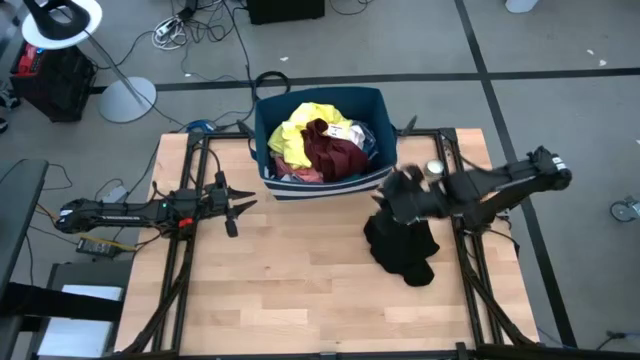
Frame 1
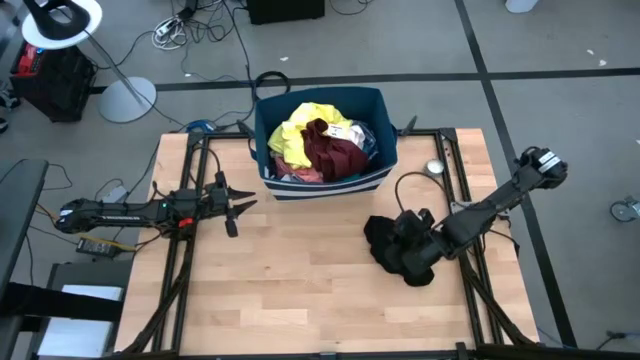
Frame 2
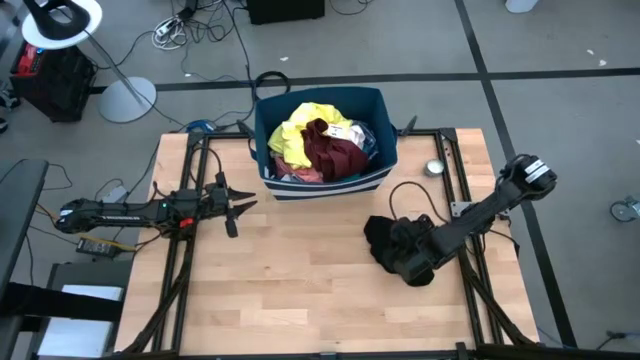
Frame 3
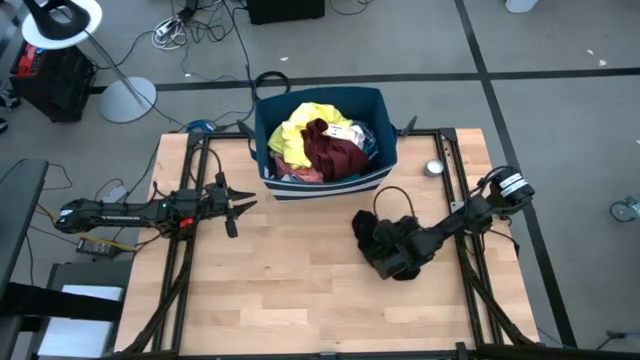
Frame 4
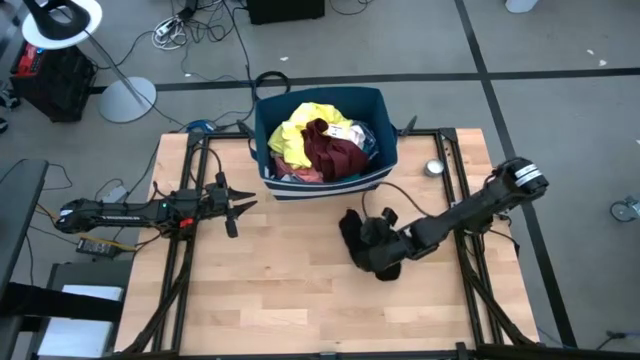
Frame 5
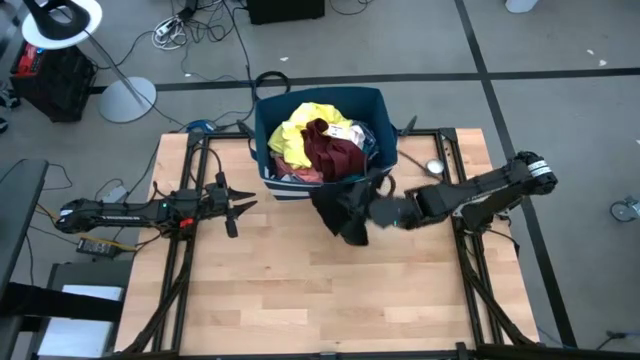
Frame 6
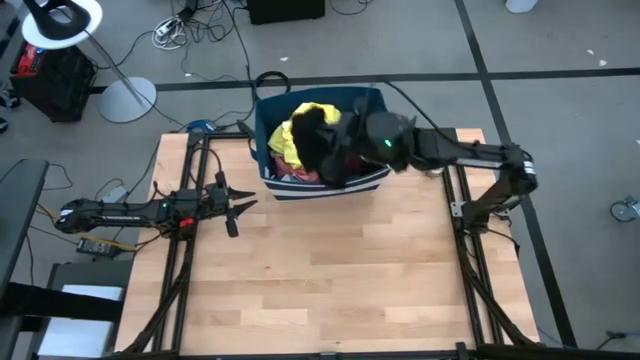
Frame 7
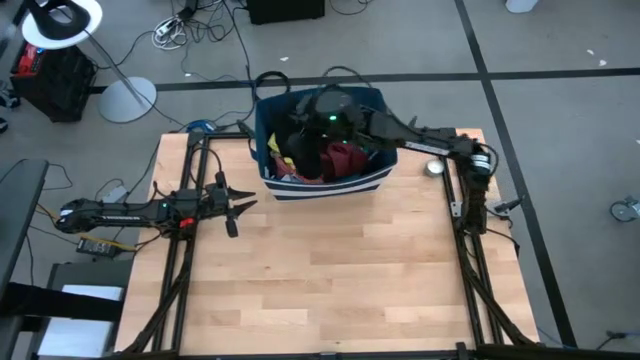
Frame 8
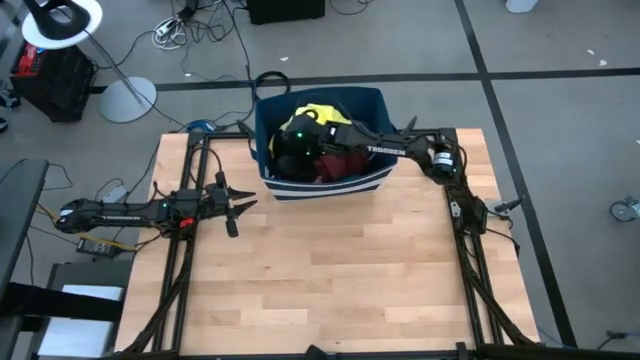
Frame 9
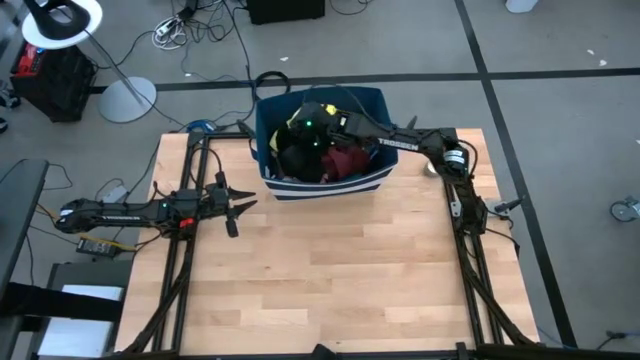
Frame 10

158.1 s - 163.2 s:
Task: Sort clothes
Put the black underwear into the blue bin

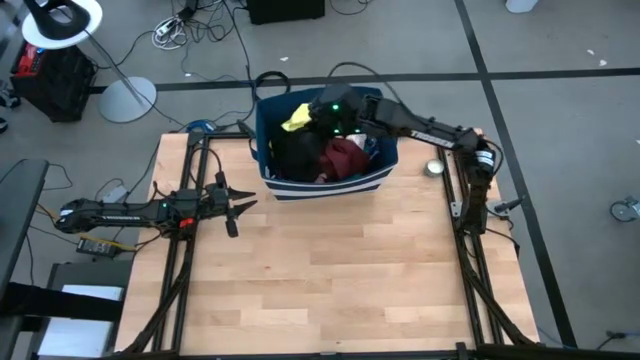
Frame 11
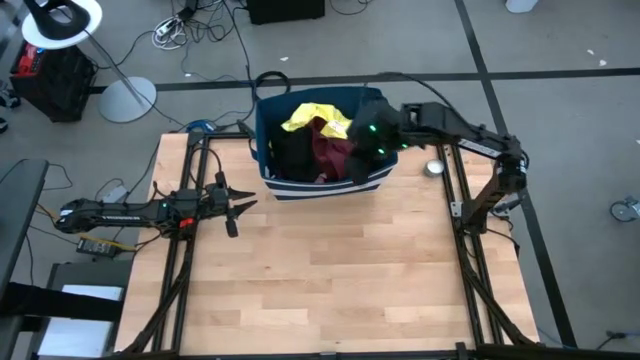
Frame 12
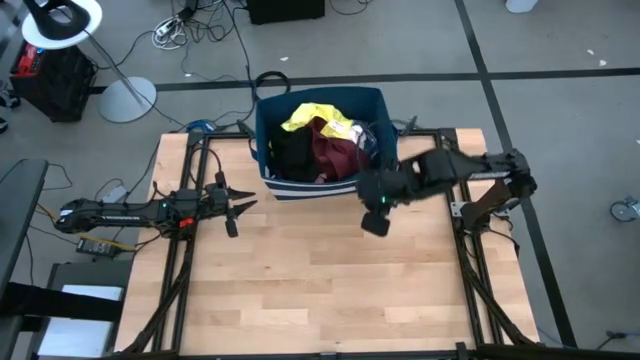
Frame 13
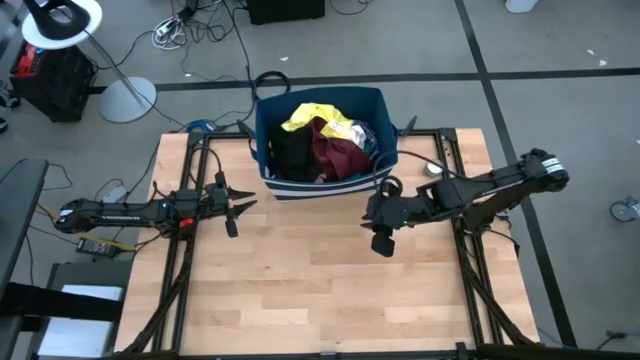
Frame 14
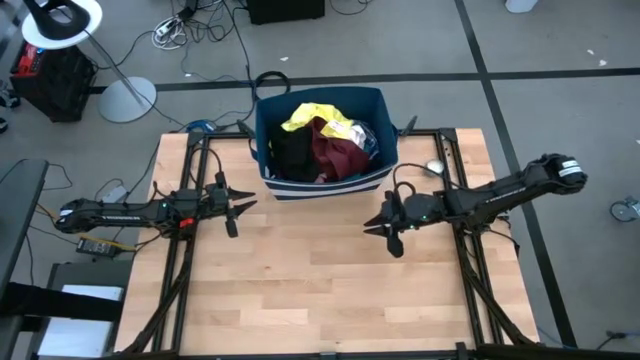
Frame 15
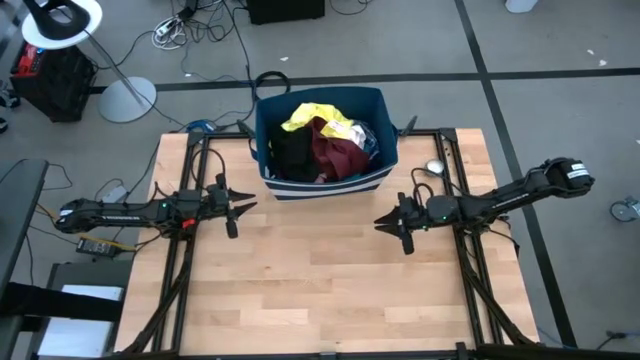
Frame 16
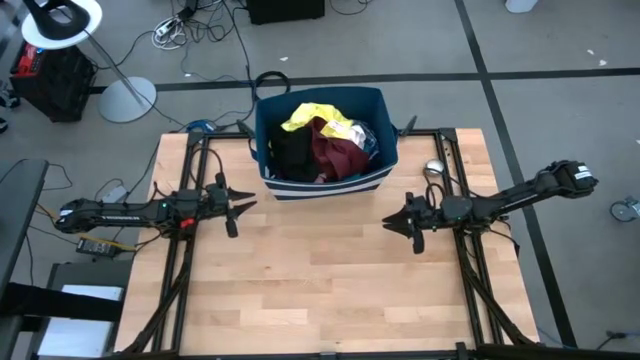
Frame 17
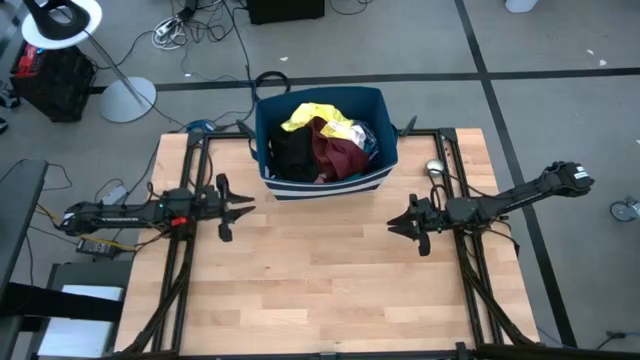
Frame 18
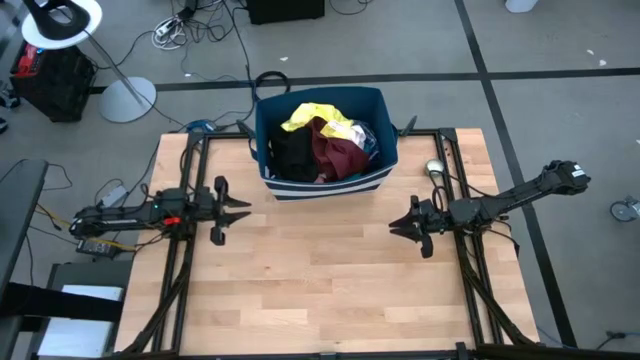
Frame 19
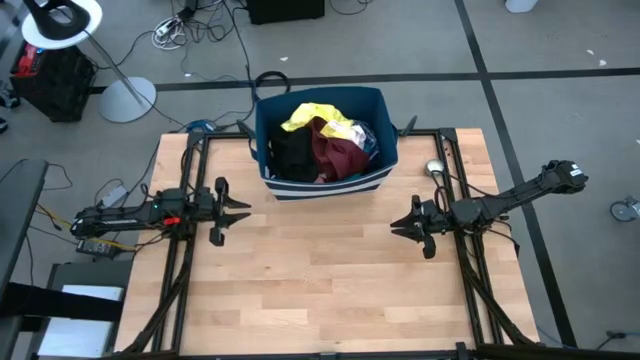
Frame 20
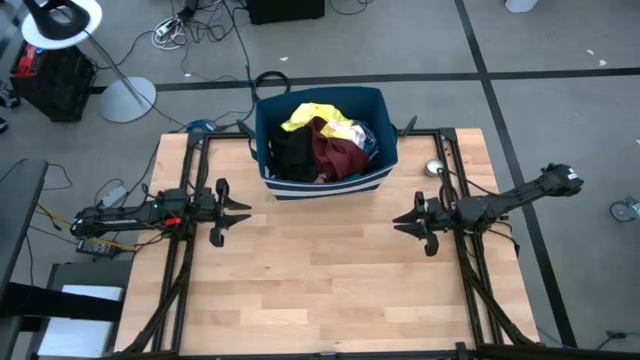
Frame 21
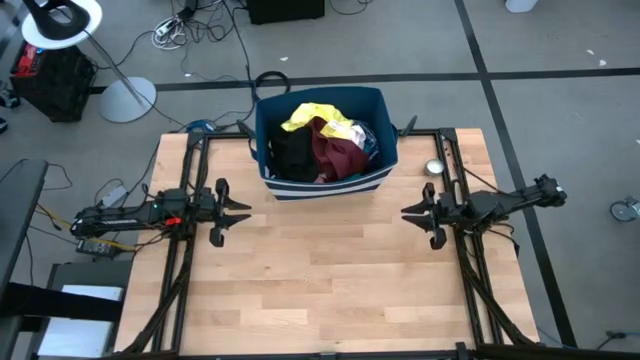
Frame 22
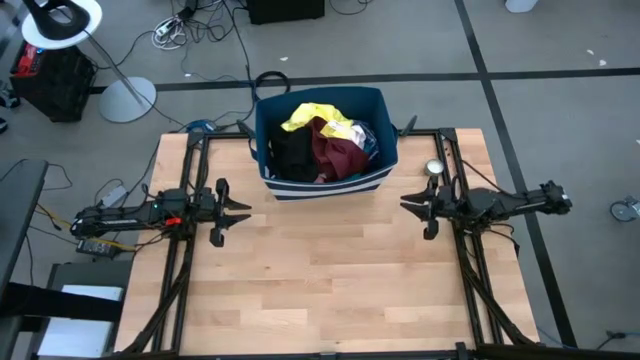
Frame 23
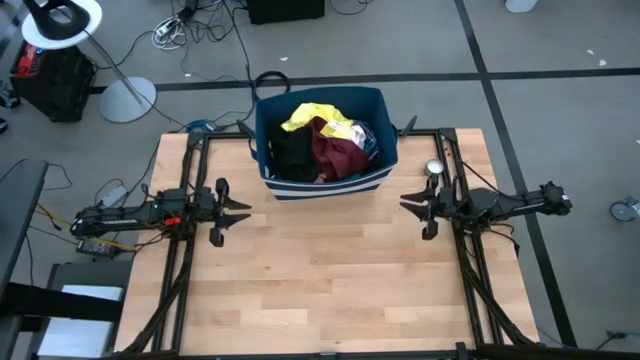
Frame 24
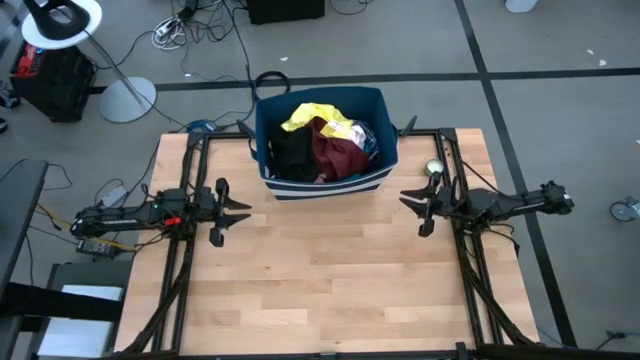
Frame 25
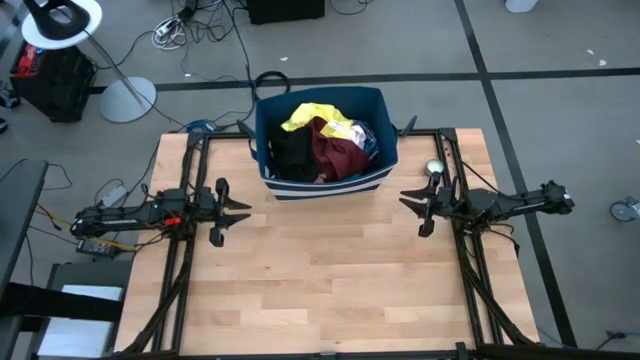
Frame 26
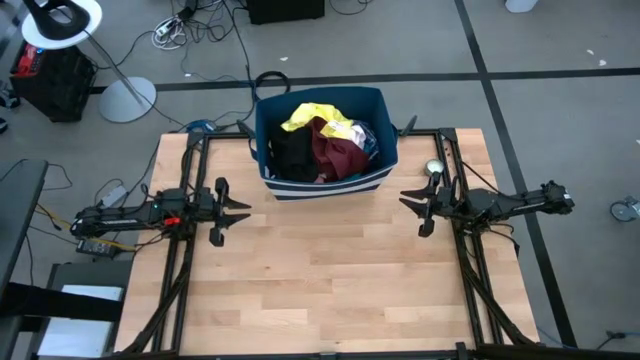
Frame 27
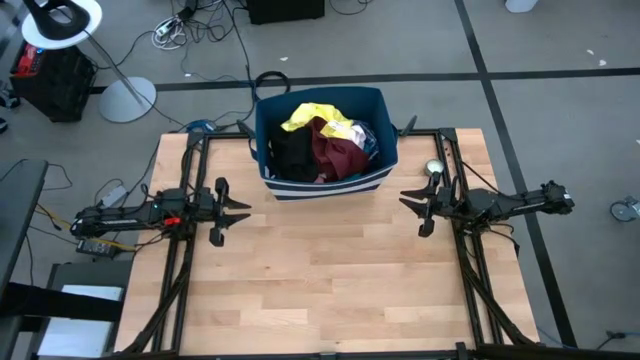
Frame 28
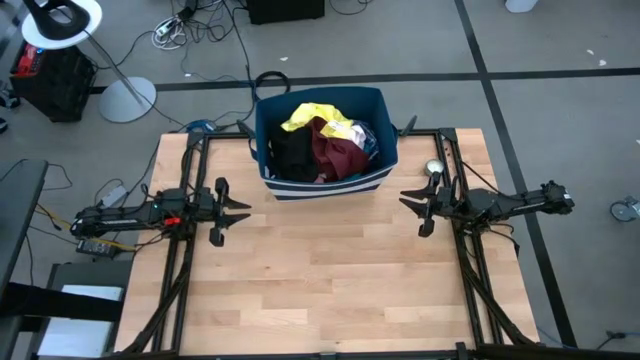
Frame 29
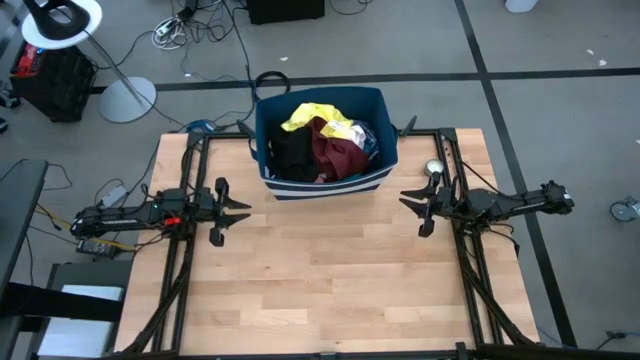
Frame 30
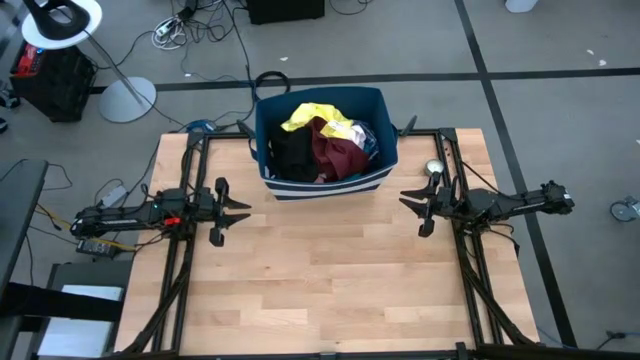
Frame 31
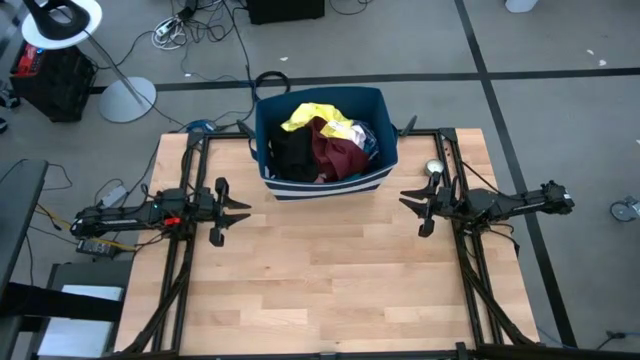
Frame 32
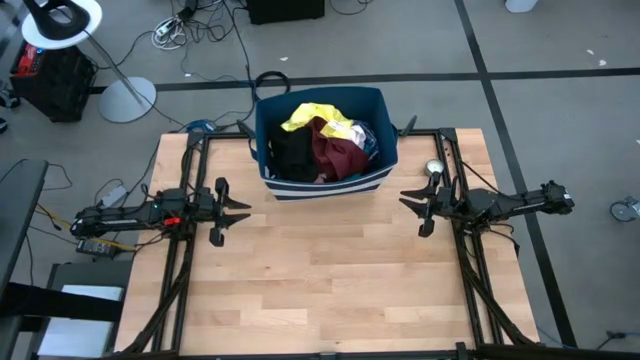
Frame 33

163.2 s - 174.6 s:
Return to Home Position
